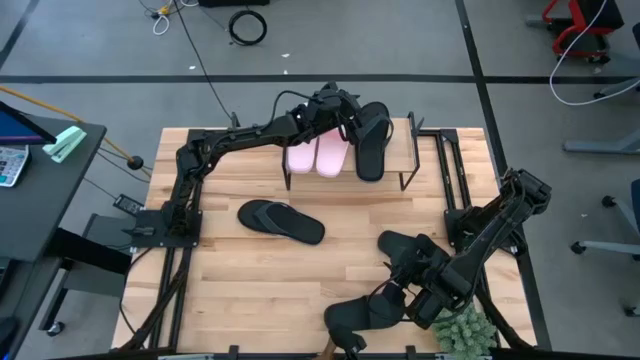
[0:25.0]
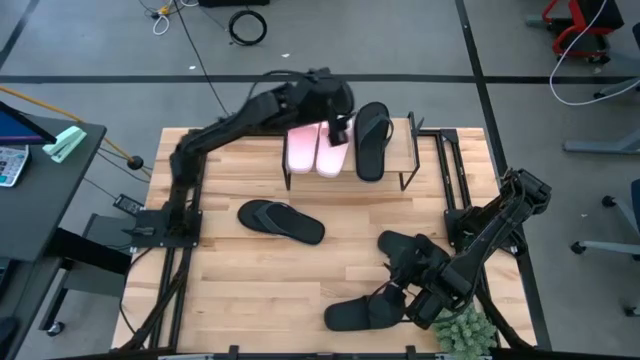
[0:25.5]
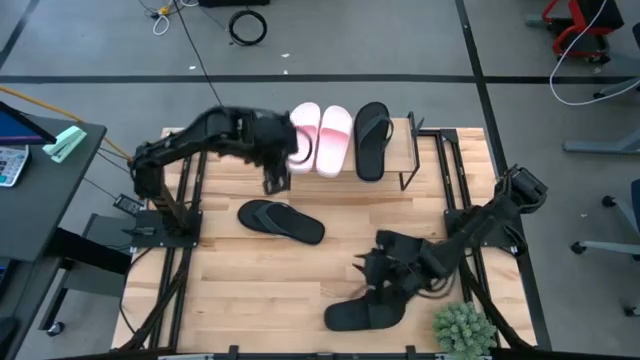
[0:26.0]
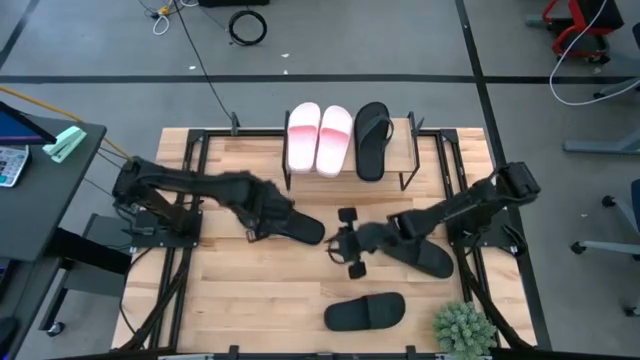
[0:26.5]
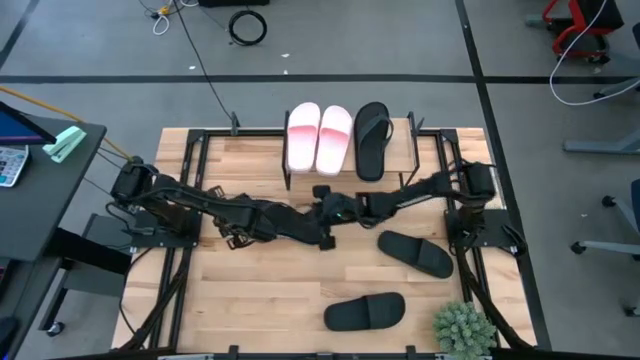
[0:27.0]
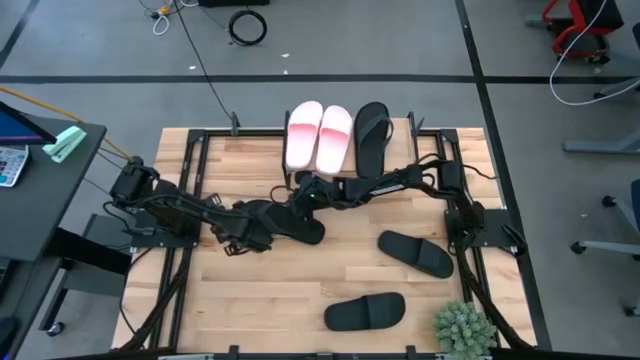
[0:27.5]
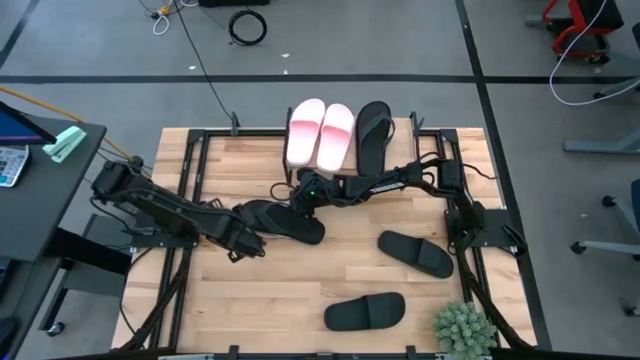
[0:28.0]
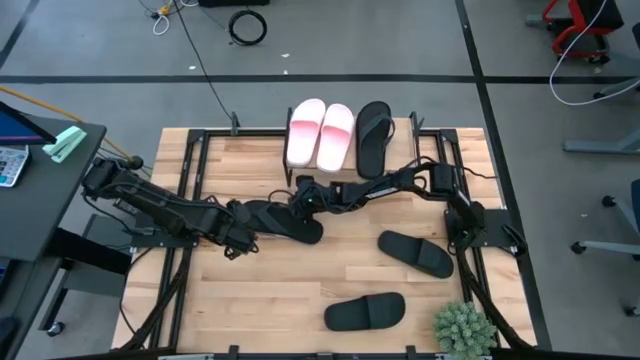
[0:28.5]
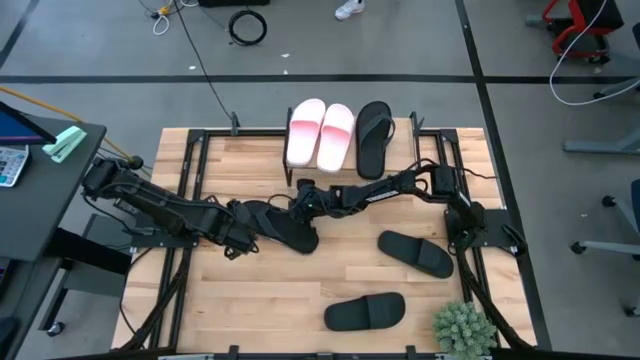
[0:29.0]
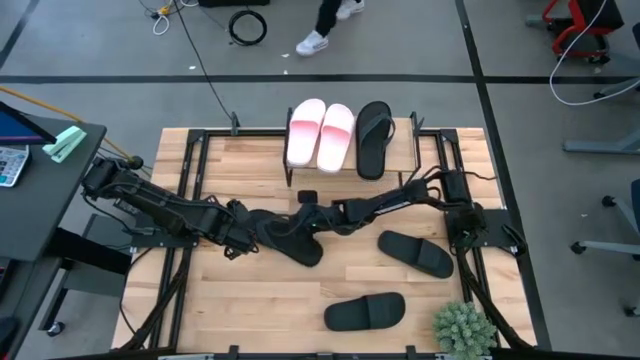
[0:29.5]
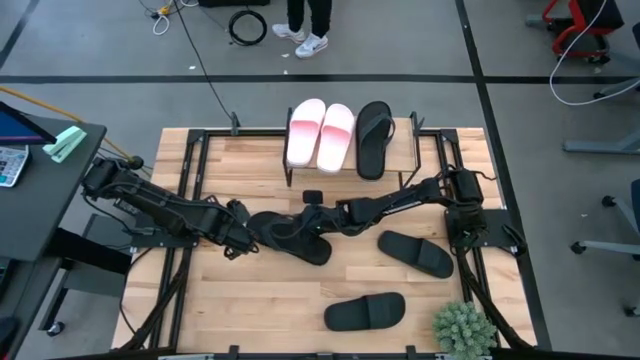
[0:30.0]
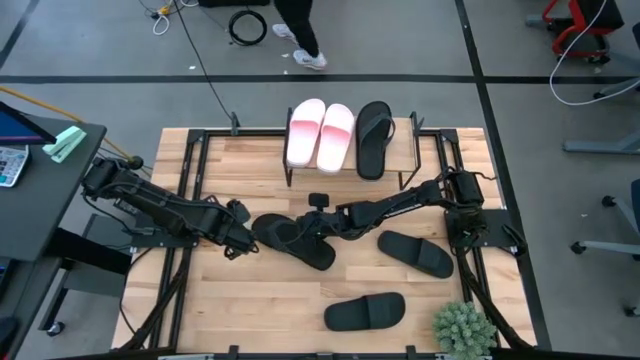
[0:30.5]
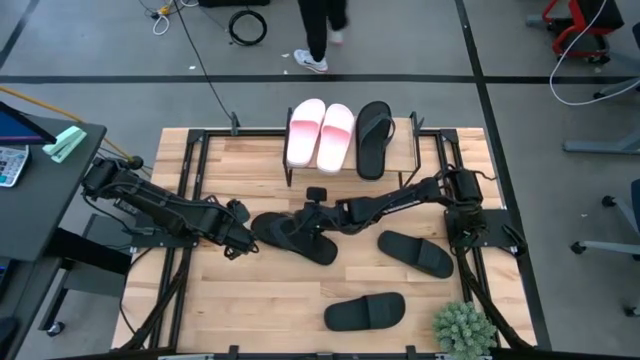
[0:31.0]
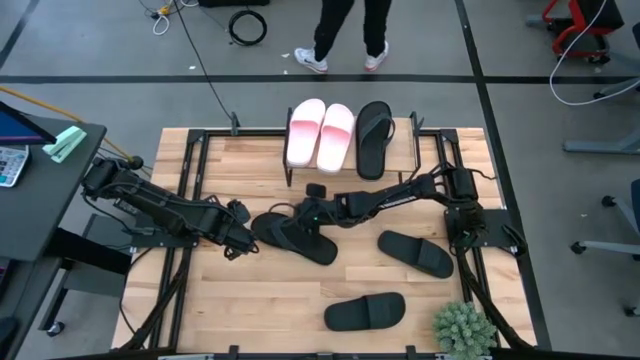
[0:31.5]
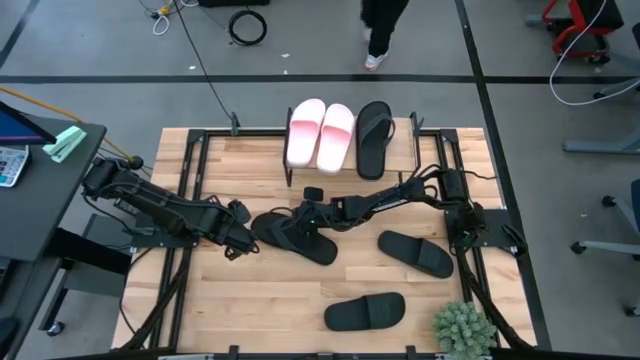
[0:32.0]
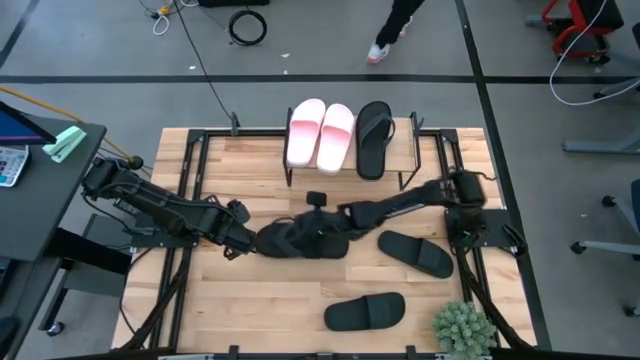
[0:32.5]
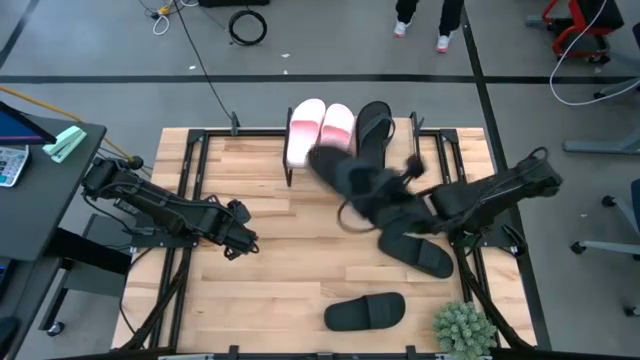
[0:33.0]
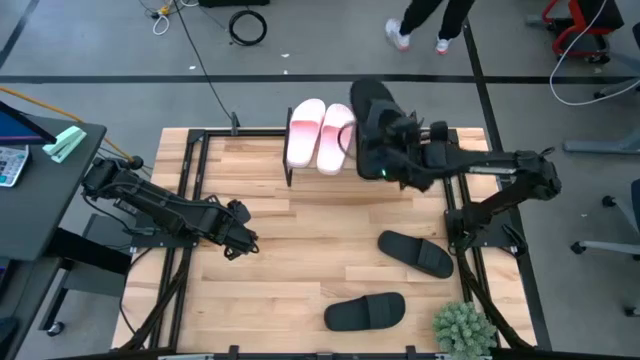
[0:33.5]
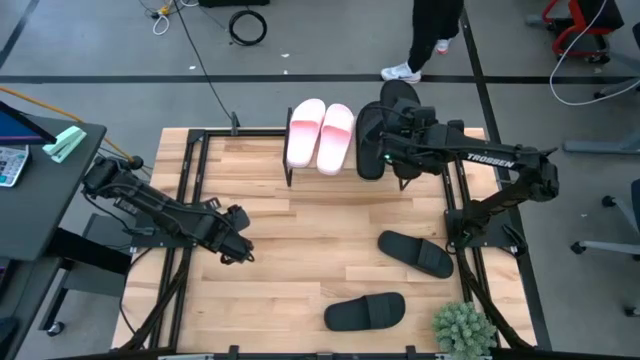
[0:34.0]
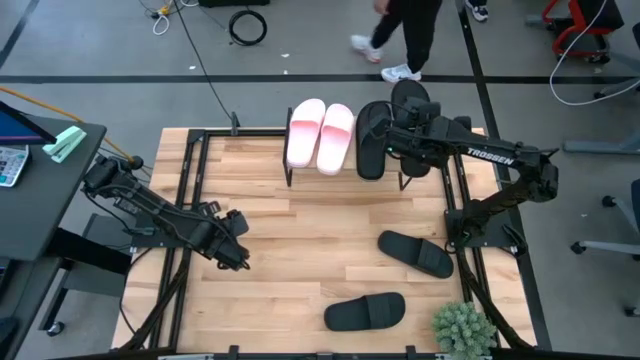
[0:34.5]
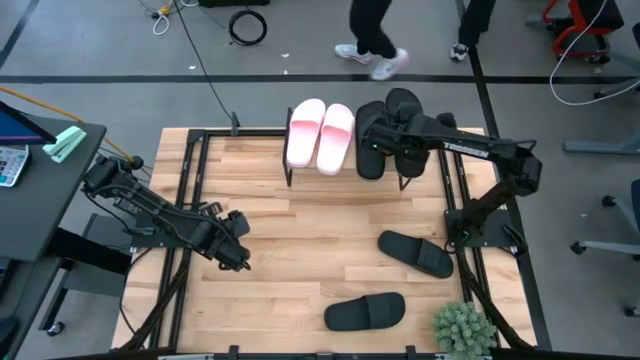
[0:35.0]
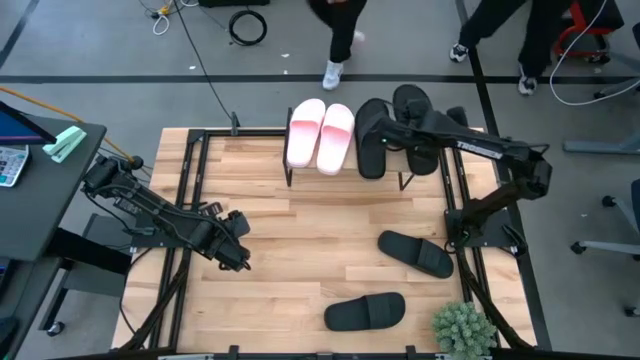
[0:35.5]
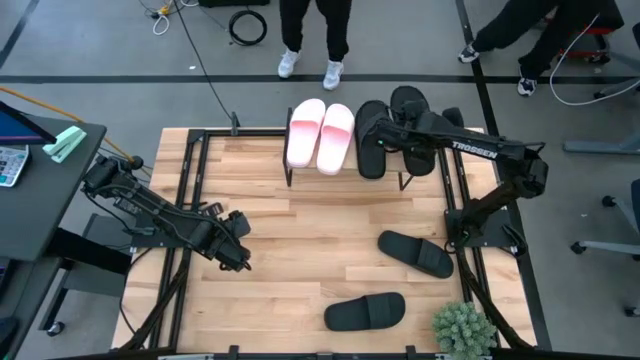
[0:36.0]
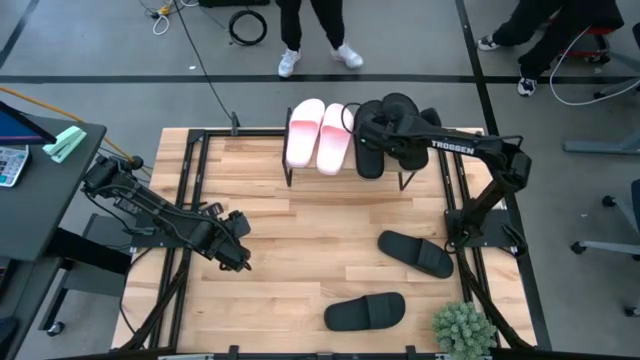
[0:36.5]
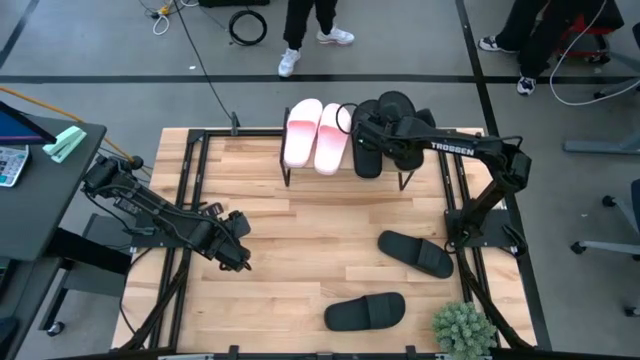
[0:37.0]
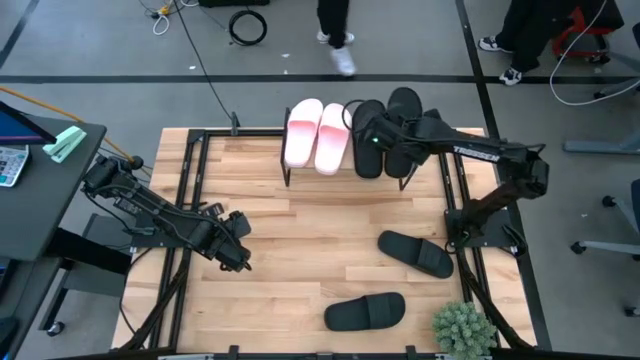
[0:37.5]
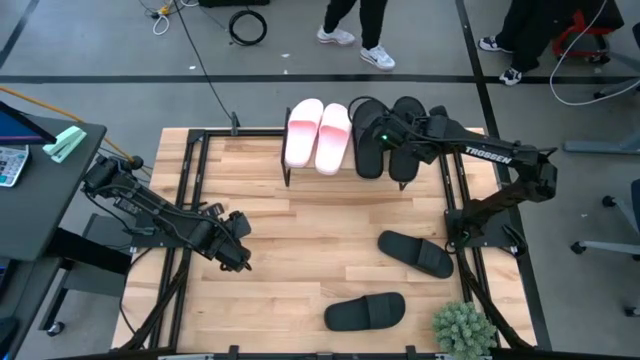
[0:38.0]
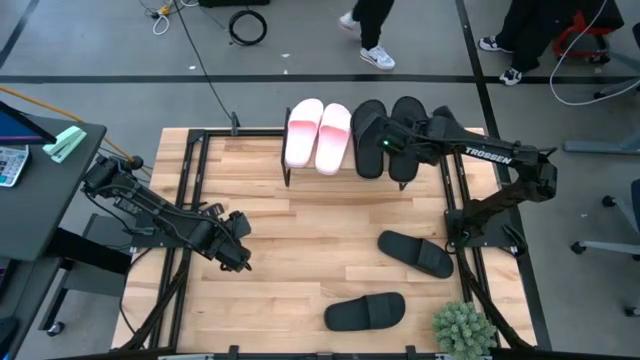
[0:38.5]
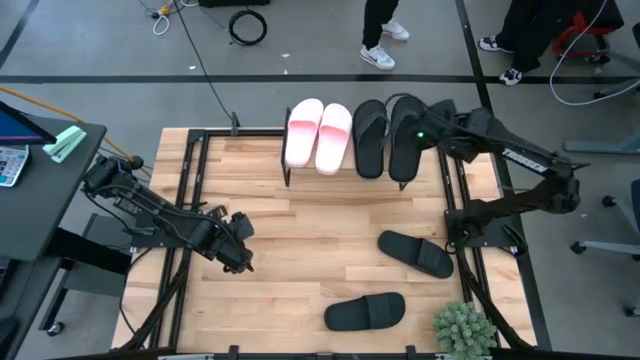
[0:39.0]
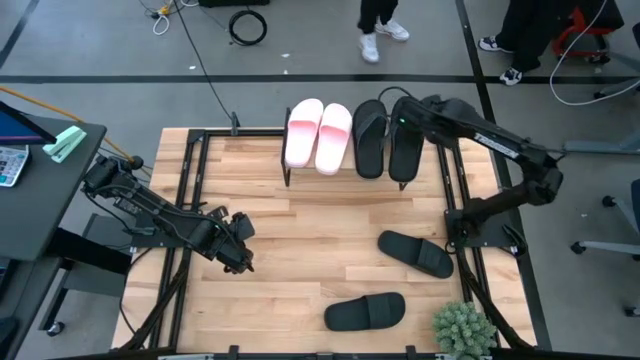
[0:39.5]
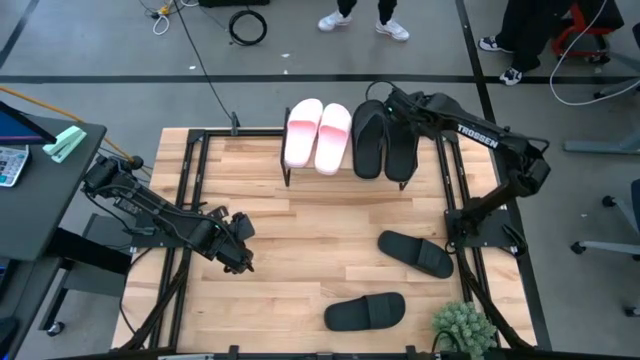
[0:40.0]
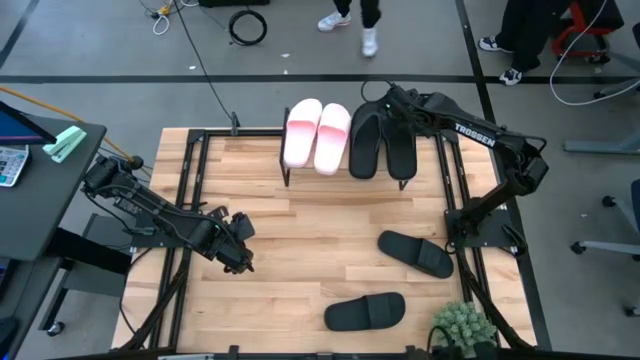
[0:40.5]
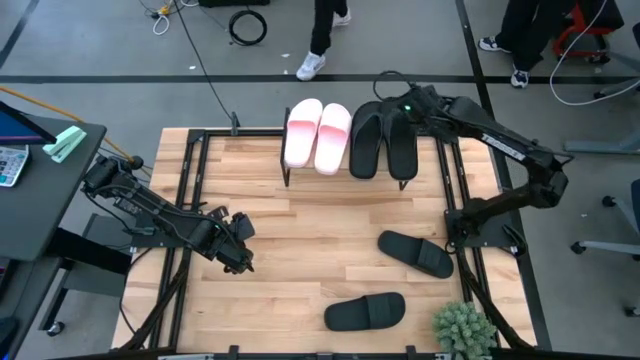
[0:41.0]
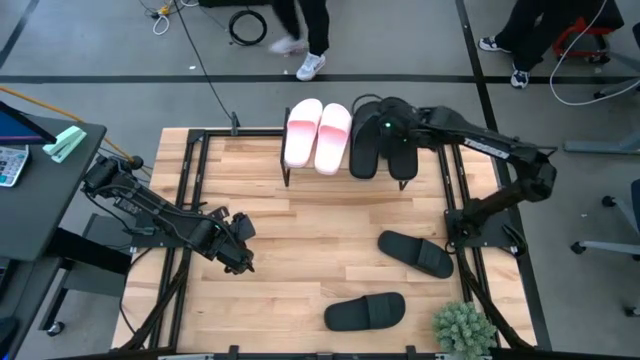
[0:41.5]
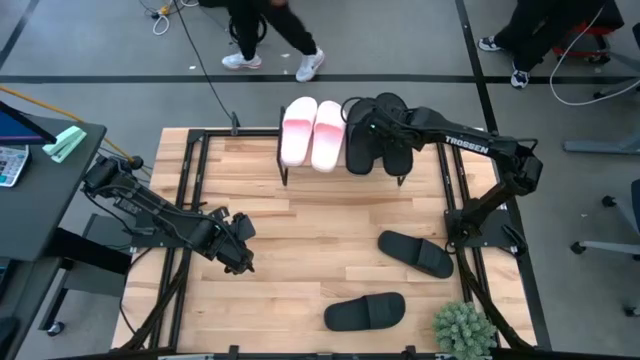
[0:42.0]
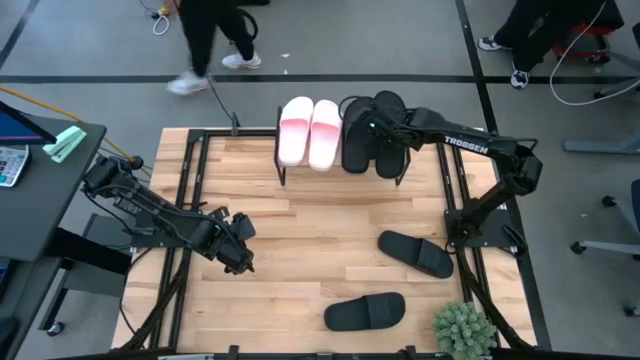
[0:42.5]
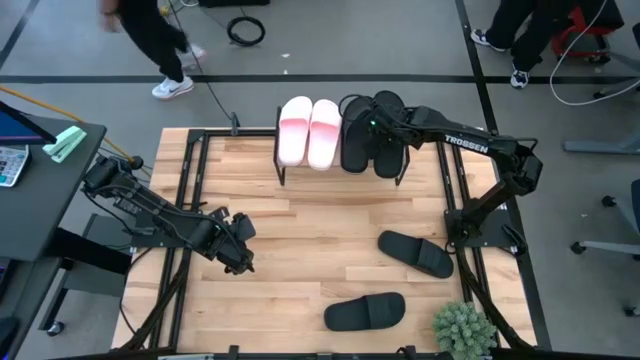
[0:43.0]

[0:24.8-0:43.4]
Task: Pick and place slides into the shelf
Put the black slipper on the shelf
